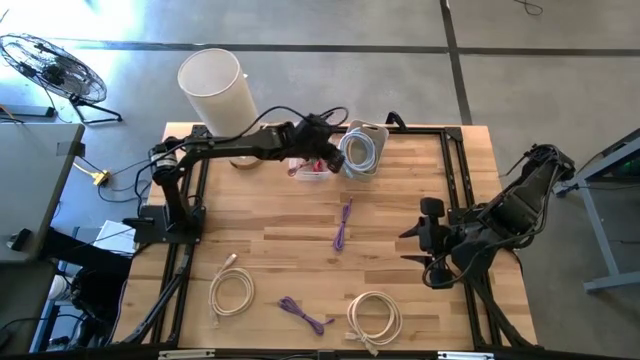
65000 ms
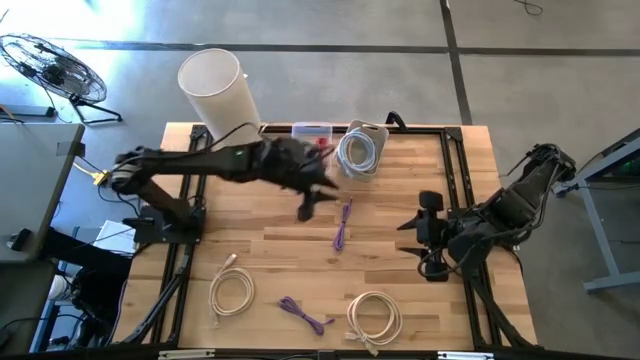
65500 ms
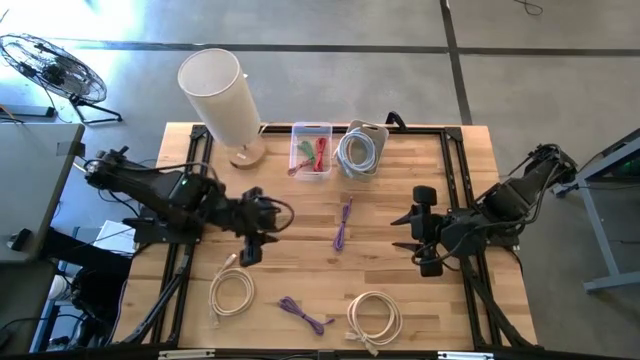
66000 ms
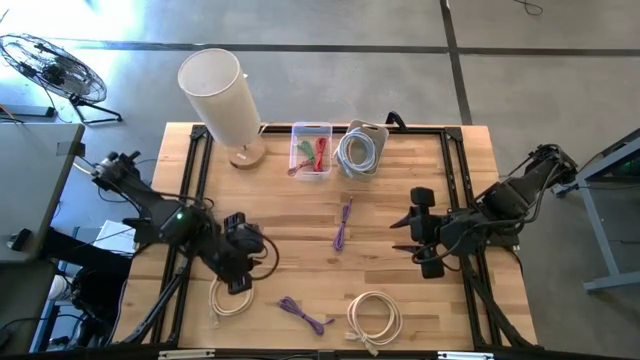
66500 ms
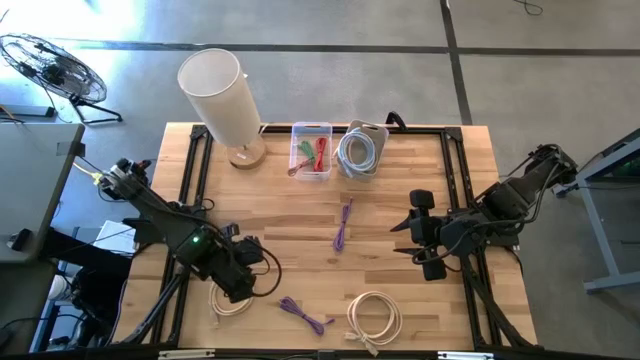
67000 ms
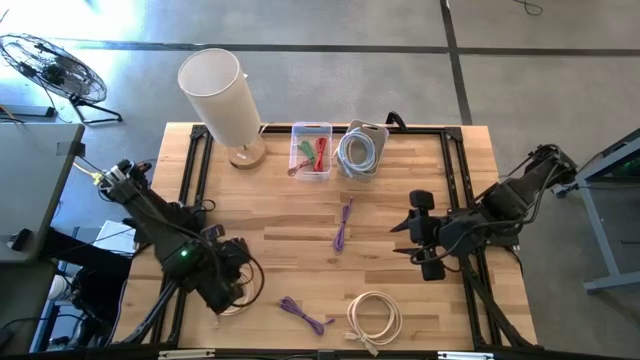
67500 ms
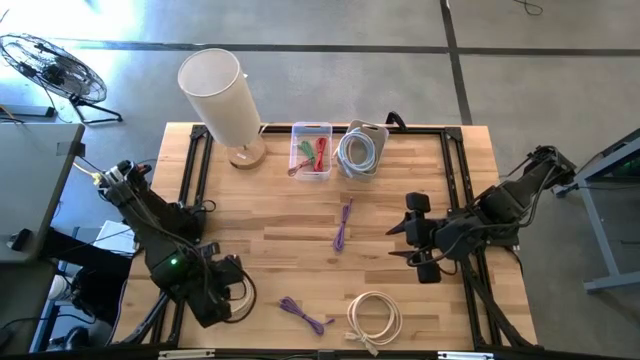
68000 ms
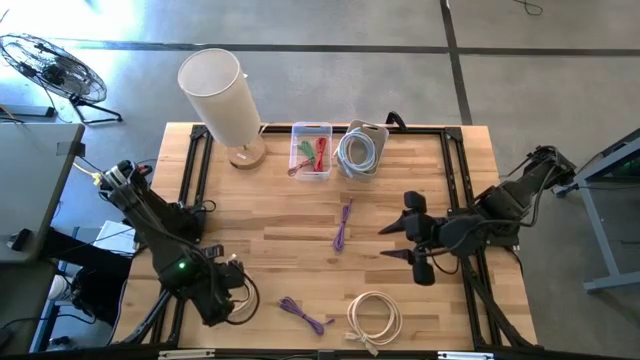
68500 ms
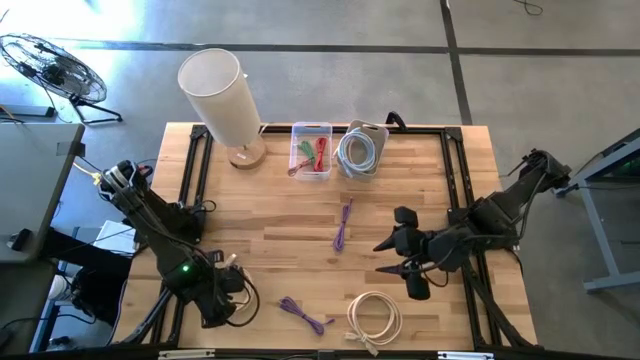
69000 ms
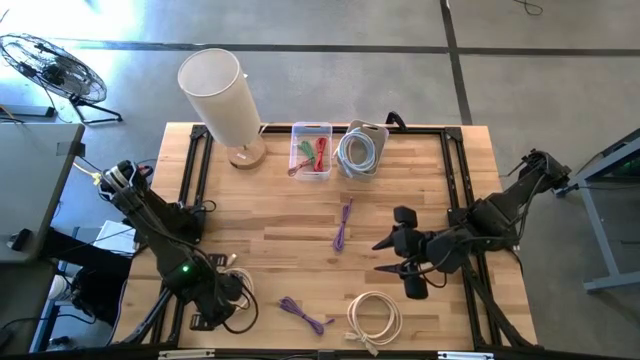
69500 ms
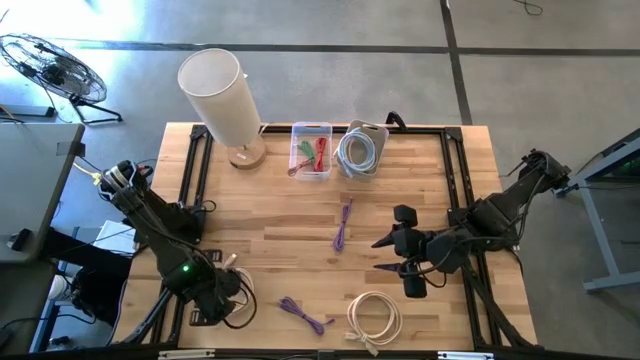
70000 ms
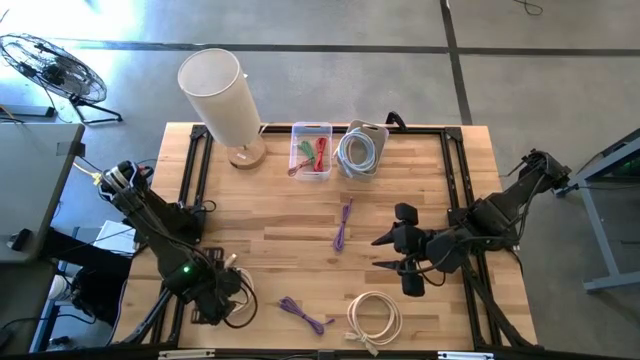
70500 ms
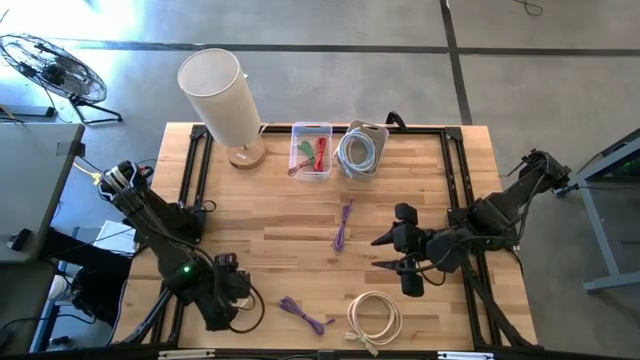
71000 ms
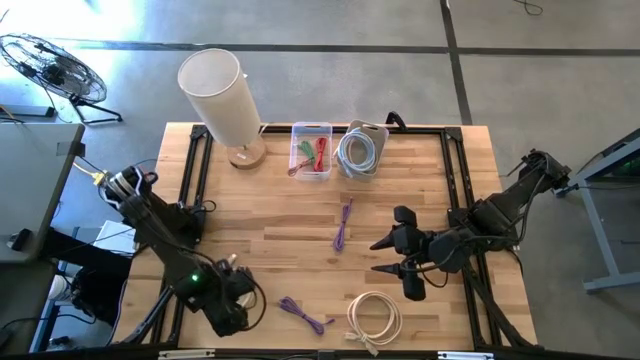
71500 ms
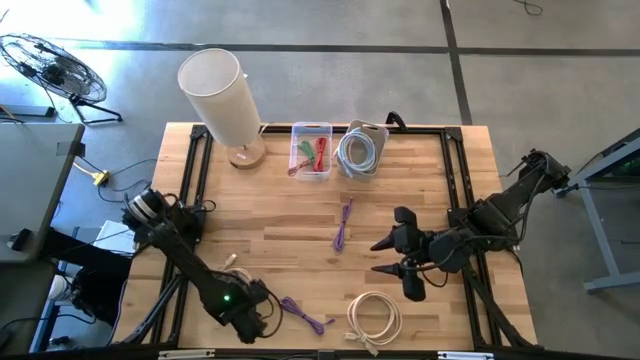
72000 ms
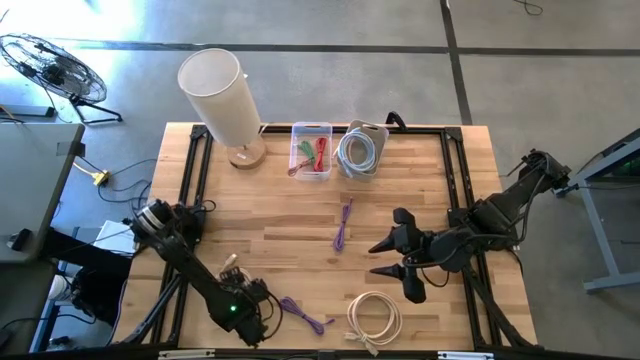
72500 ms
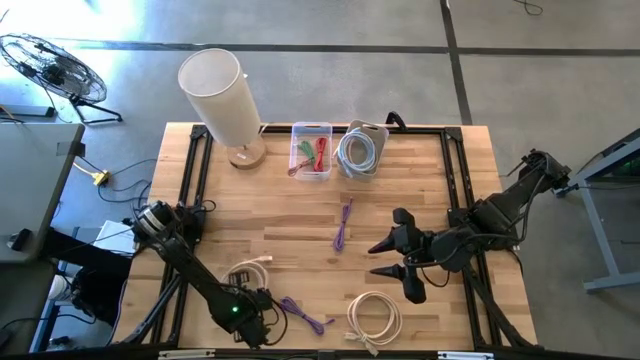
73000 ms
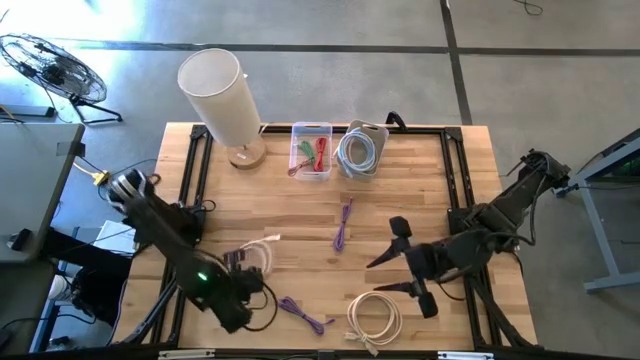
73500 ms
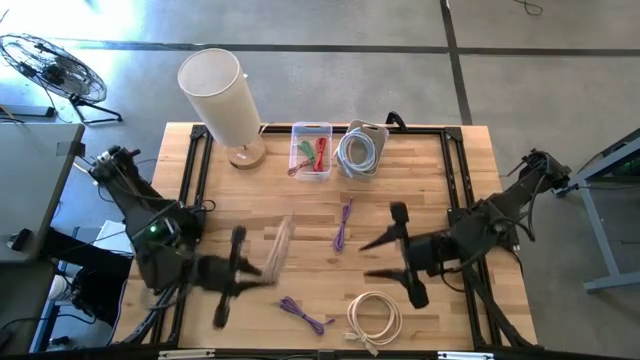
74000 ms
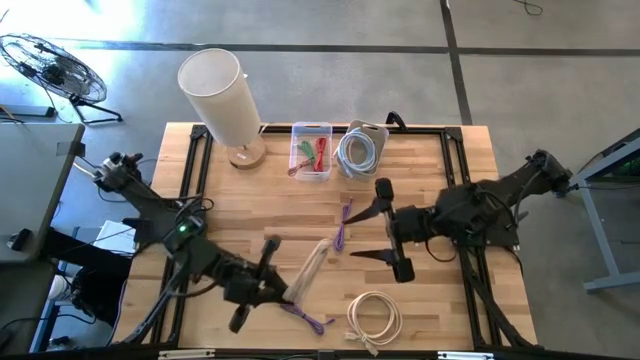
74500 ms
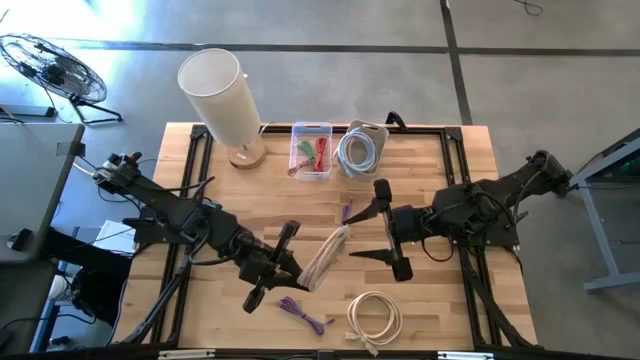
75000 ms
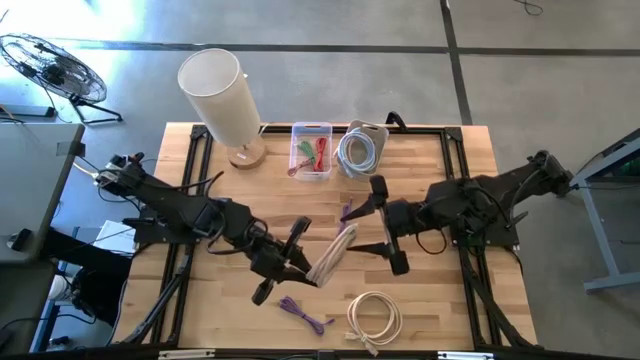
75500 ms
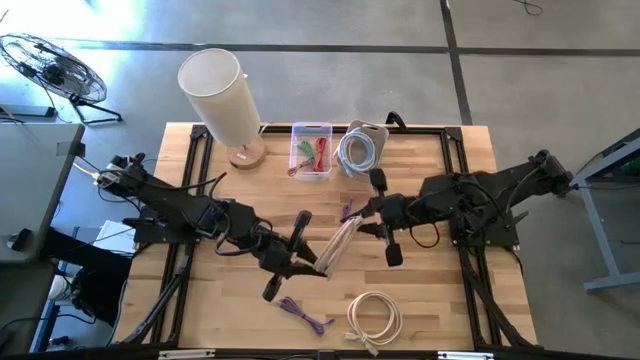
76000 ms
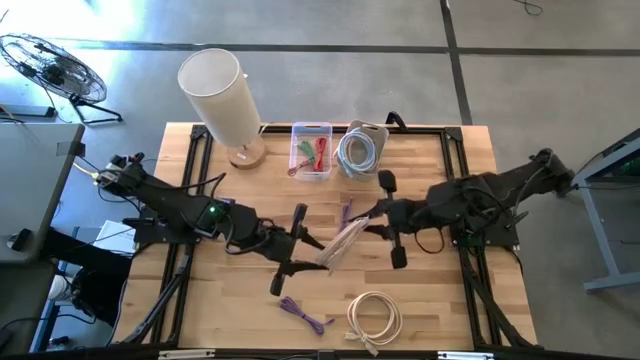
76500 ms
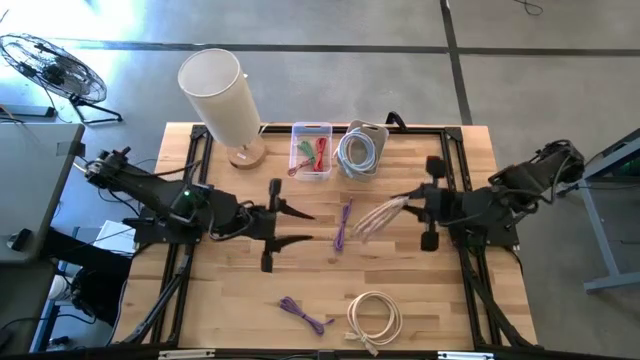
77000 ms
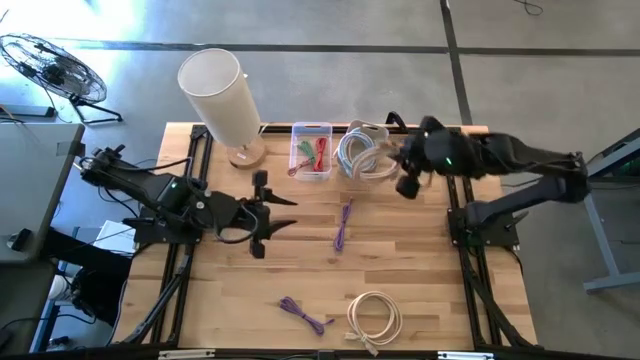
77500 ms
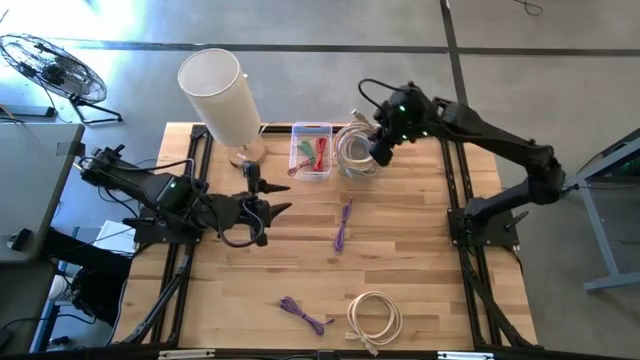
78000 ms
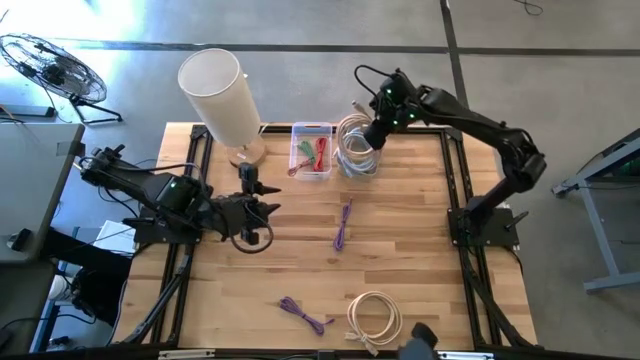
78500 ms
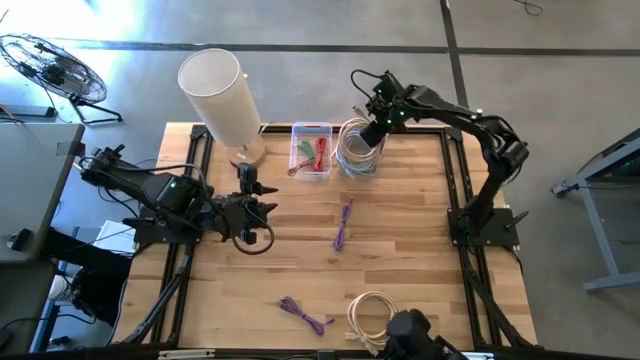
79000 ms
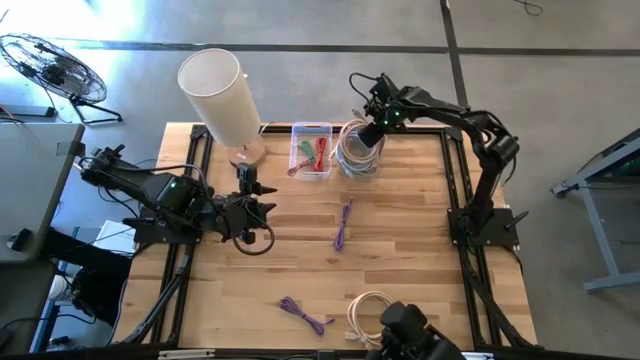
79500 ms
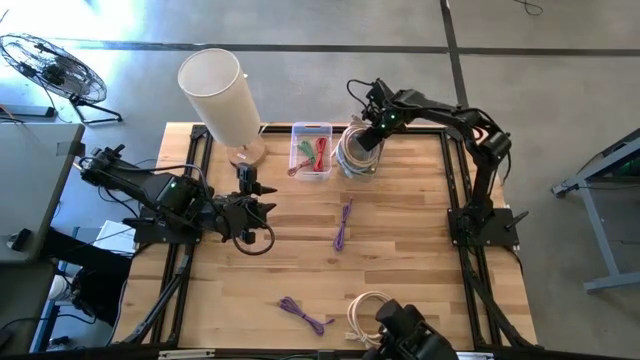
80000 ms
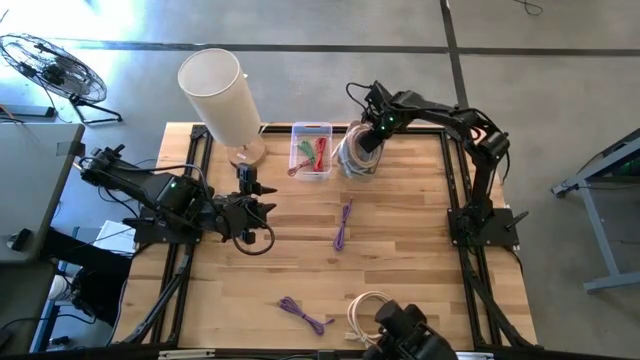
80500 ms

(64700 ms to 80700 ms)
Task: Pick & Place USB Port
Put the left light brown usb cable into the white bin

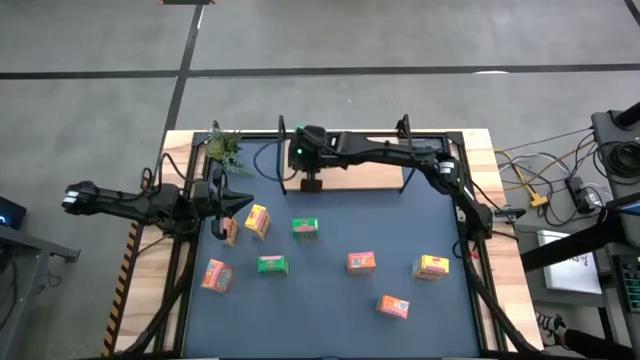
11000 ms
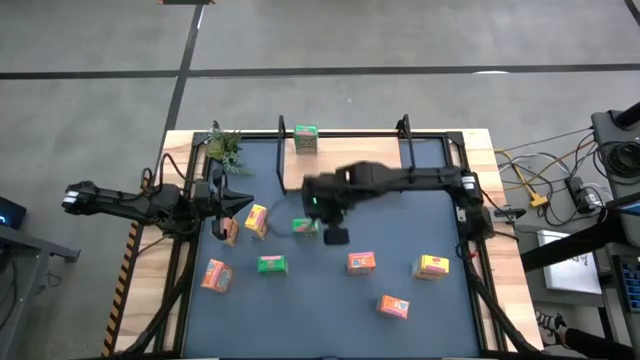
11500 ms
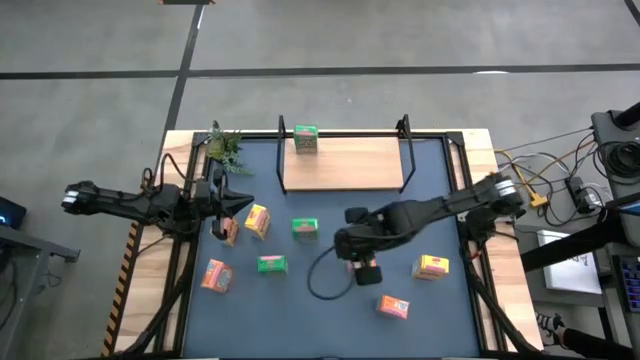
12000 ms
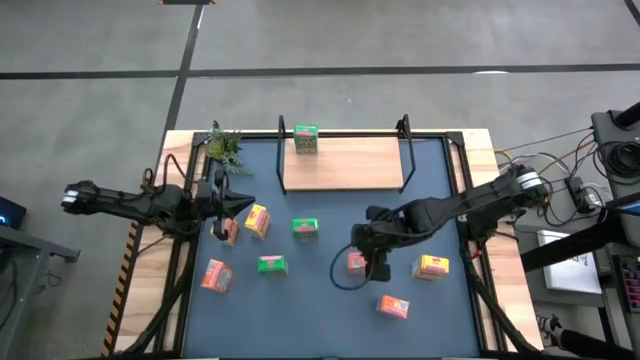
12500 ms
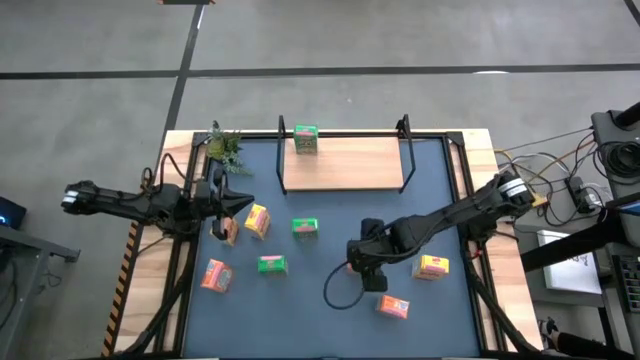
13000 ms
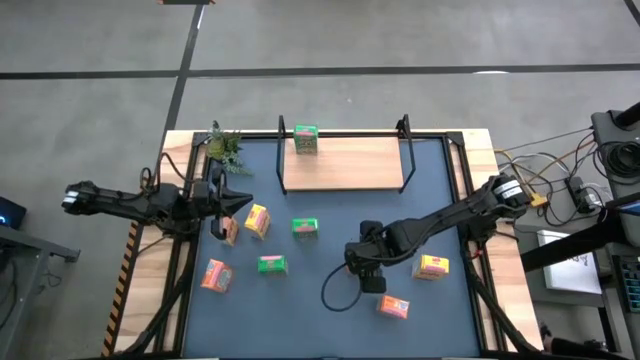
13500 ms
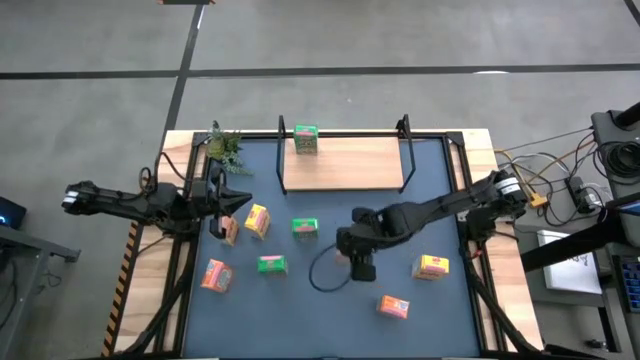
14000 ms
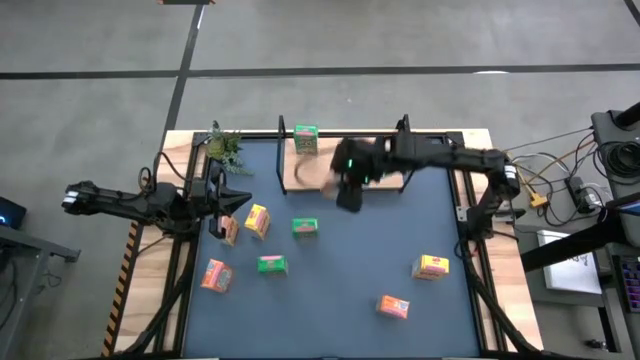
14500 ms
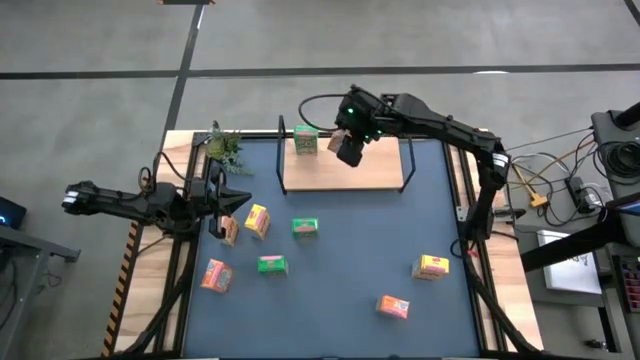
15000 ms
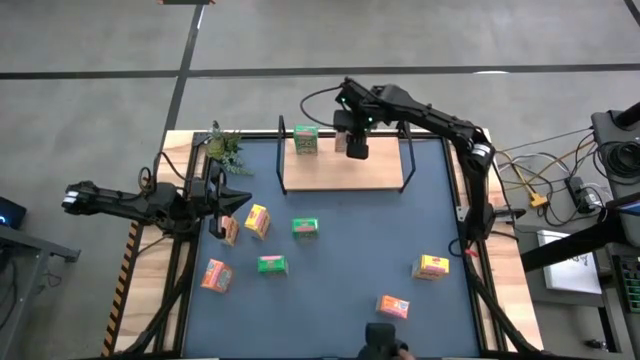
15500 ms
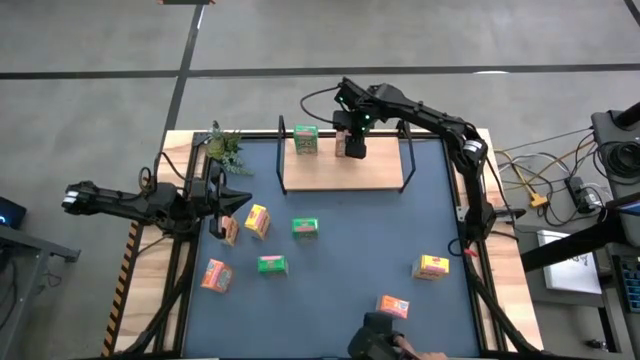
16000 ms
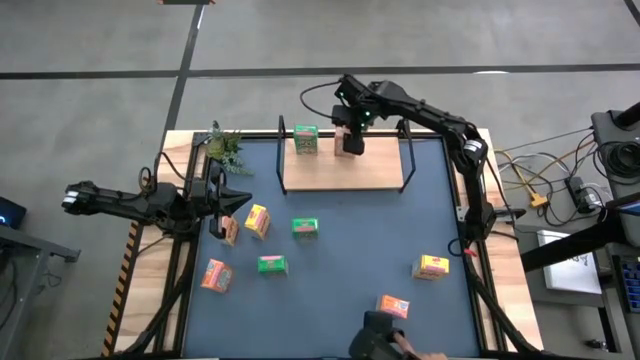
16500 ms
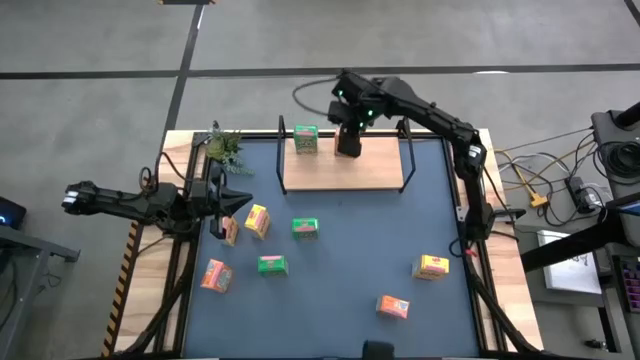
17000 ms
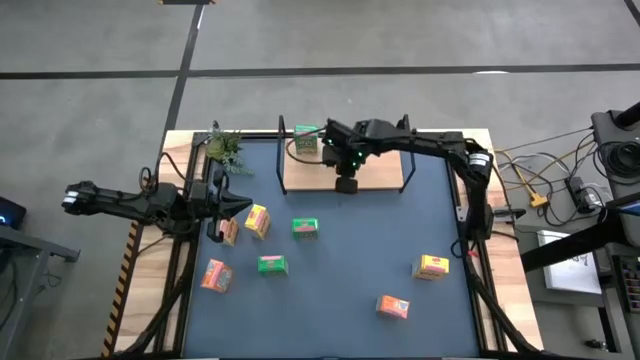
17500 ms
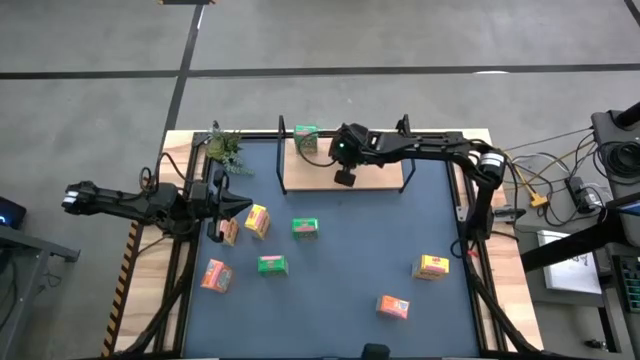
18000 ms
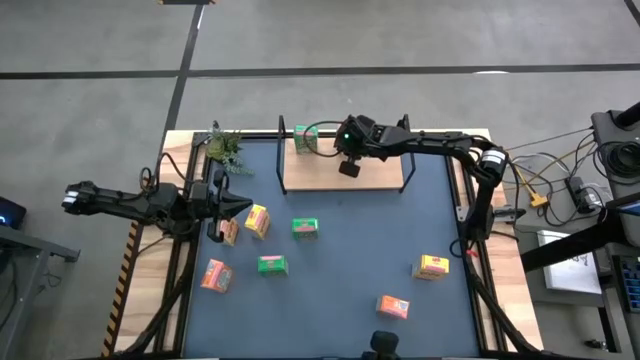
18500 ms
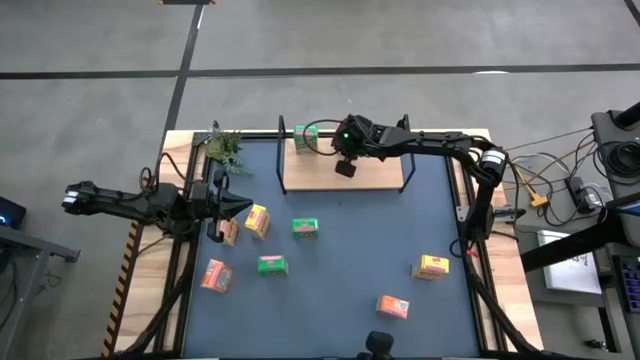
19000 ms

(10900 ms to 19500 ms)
Task: Stack cereal on shelf
Stack the center orange cereal box on the shelf
